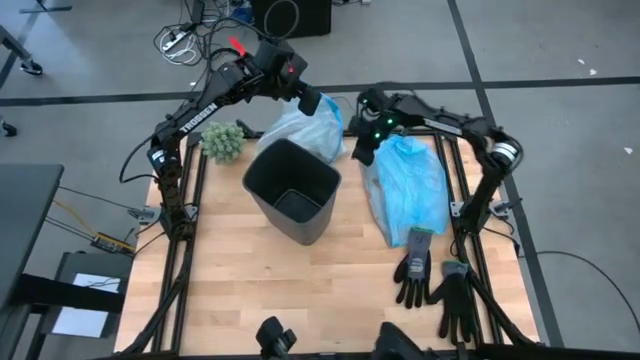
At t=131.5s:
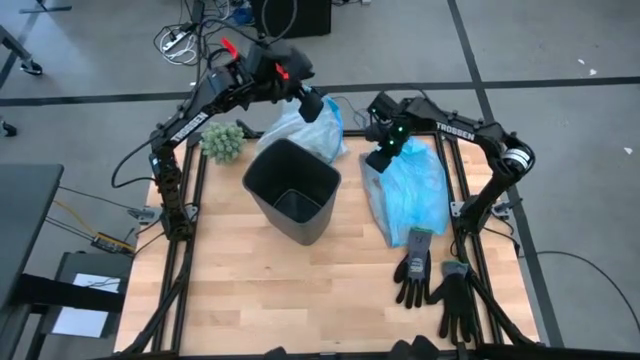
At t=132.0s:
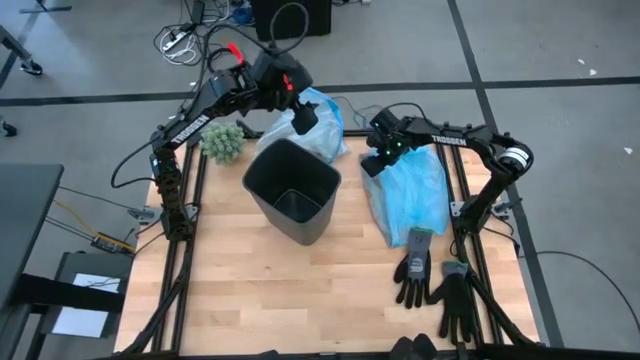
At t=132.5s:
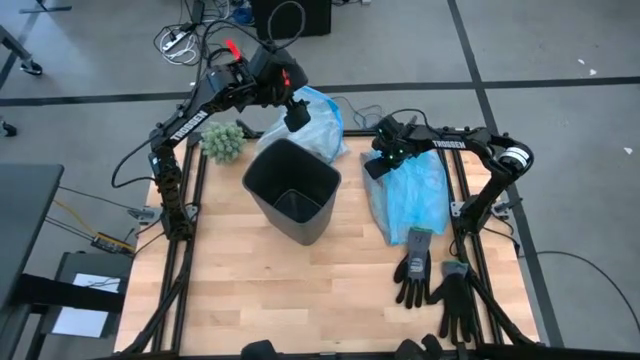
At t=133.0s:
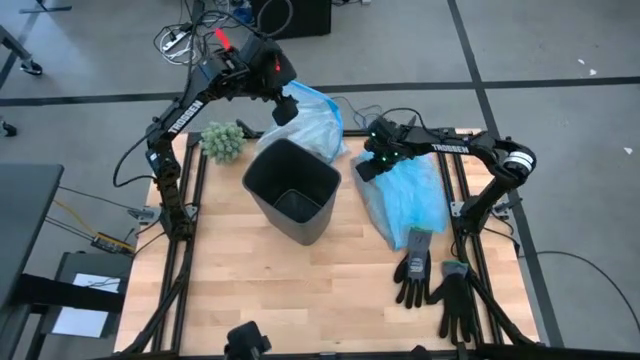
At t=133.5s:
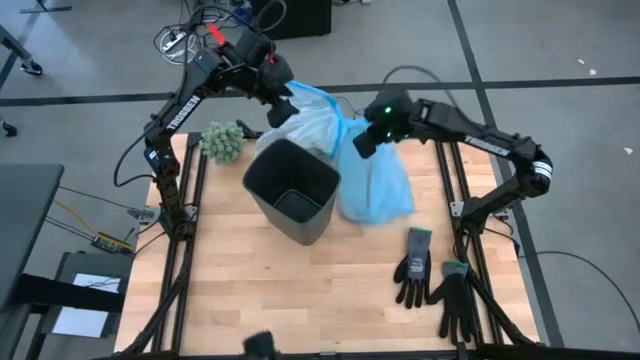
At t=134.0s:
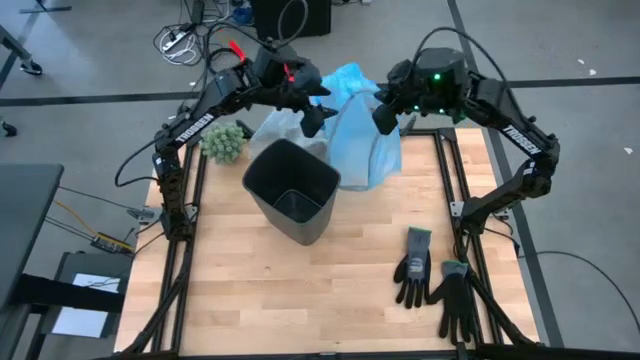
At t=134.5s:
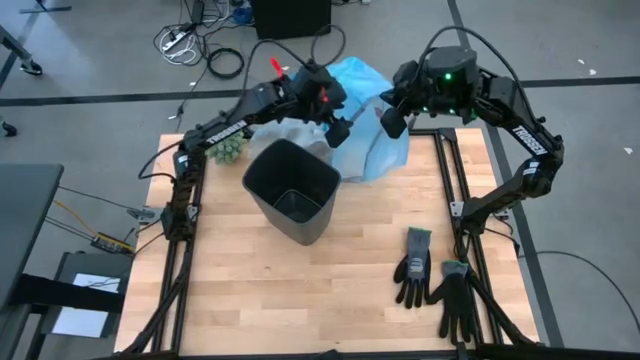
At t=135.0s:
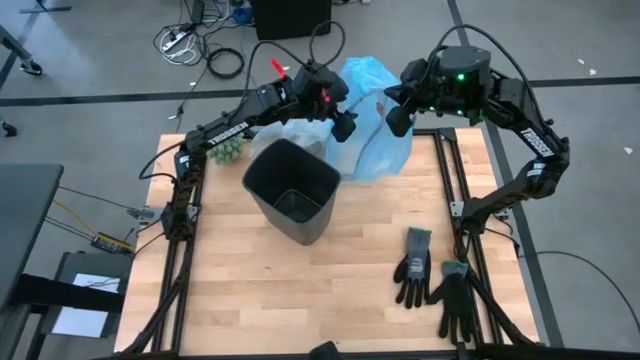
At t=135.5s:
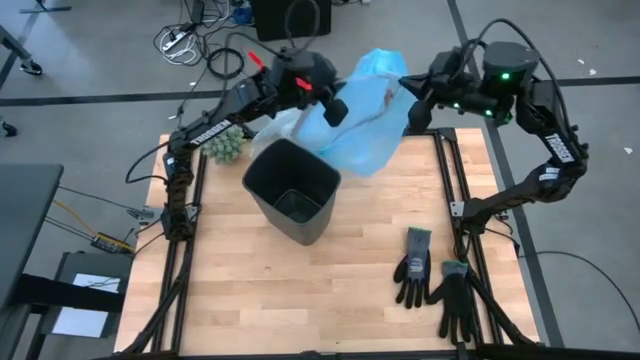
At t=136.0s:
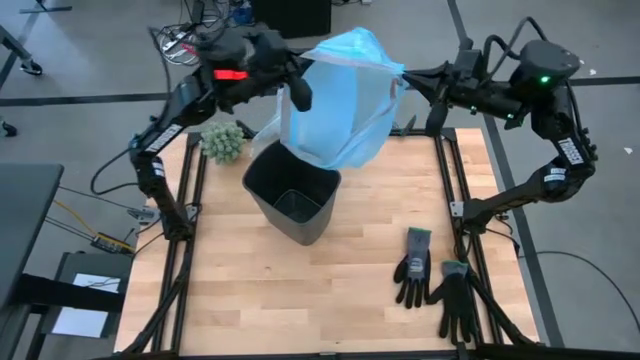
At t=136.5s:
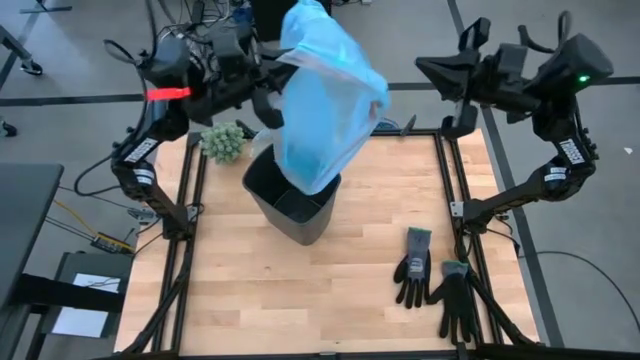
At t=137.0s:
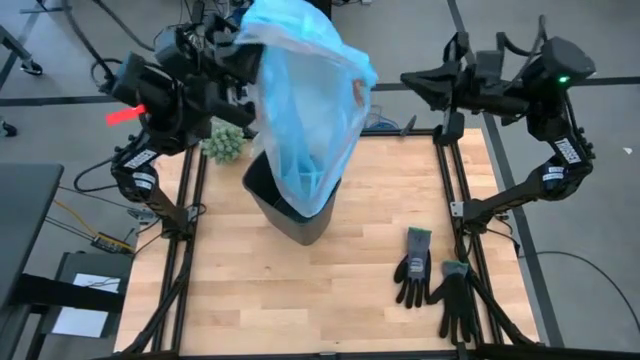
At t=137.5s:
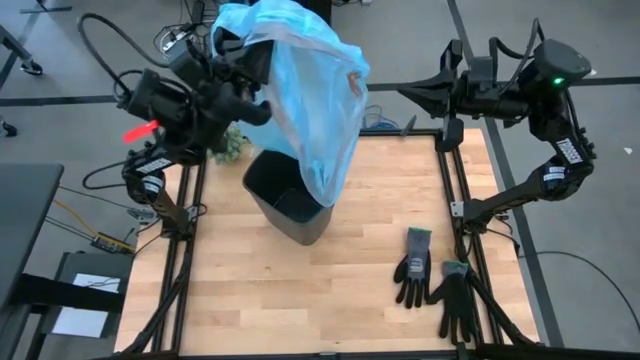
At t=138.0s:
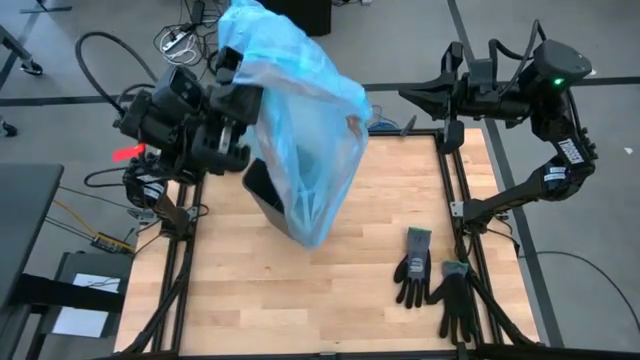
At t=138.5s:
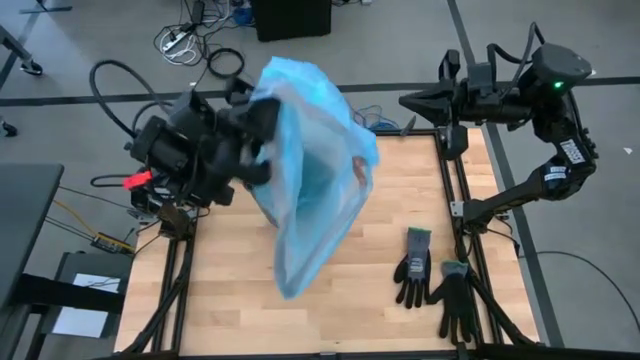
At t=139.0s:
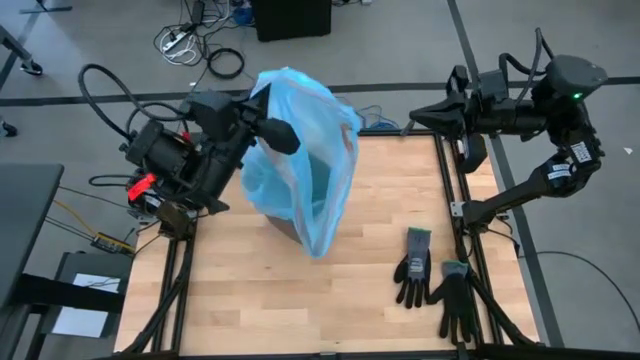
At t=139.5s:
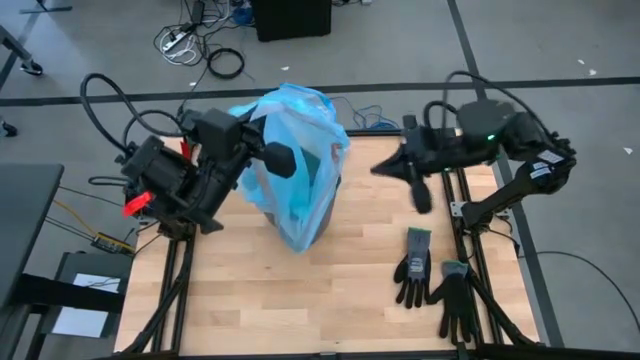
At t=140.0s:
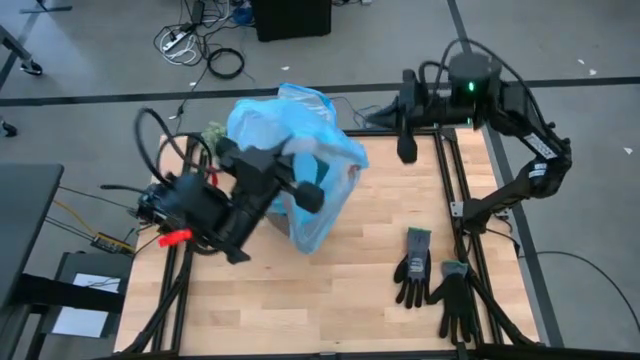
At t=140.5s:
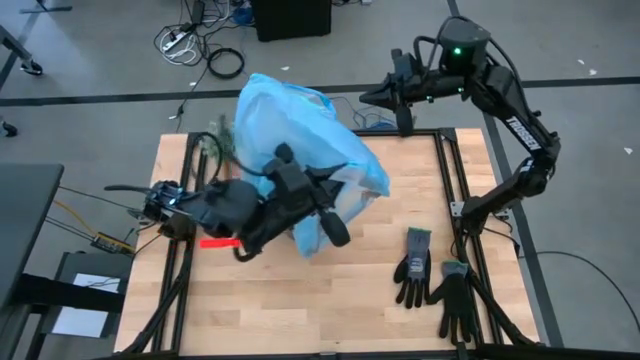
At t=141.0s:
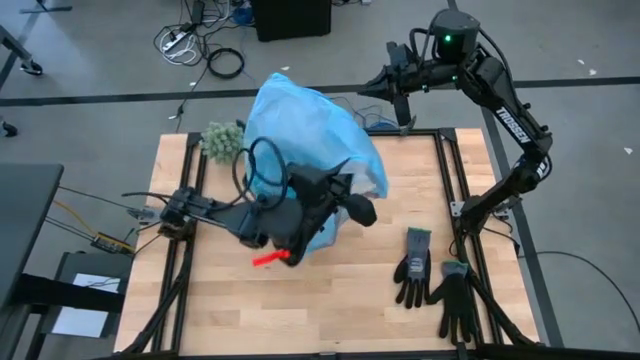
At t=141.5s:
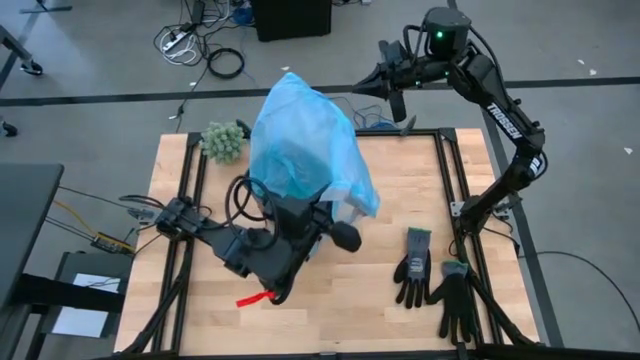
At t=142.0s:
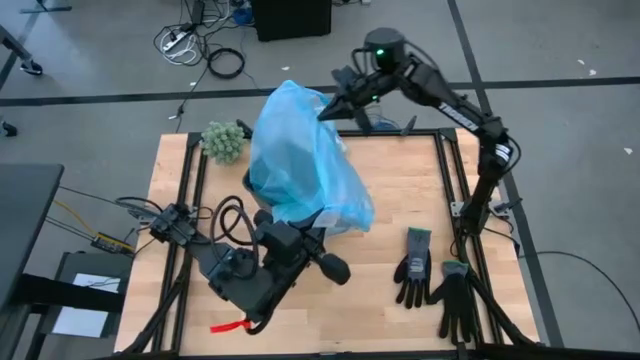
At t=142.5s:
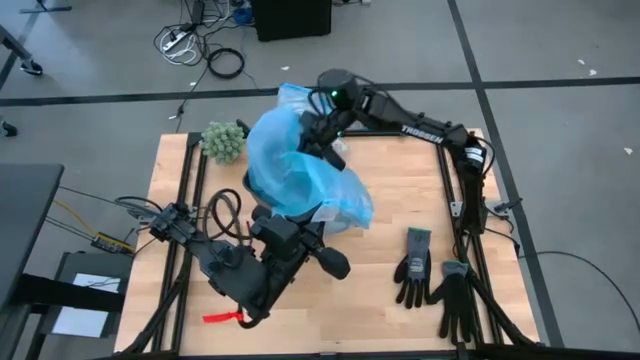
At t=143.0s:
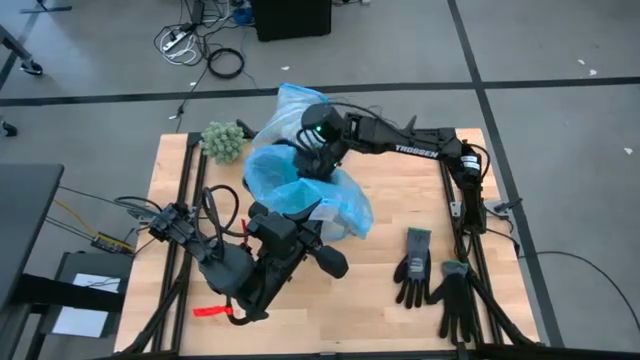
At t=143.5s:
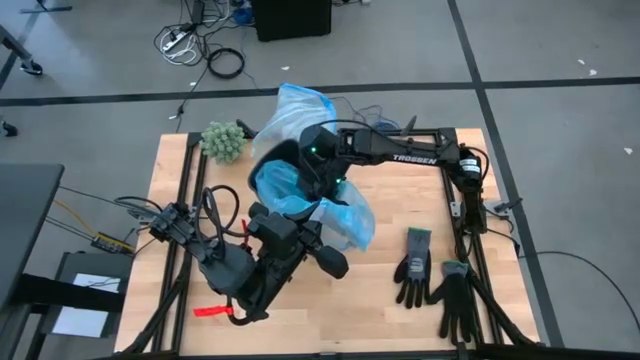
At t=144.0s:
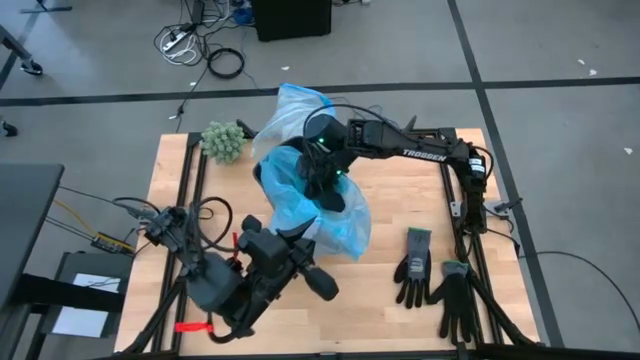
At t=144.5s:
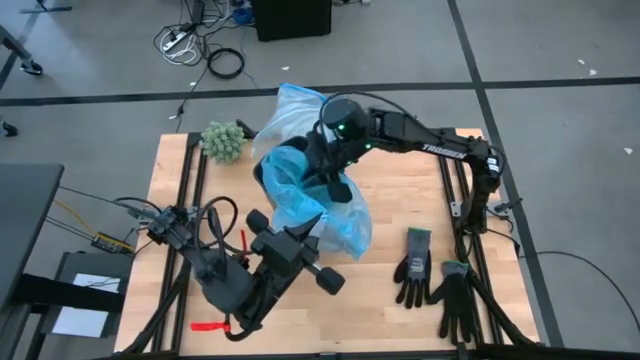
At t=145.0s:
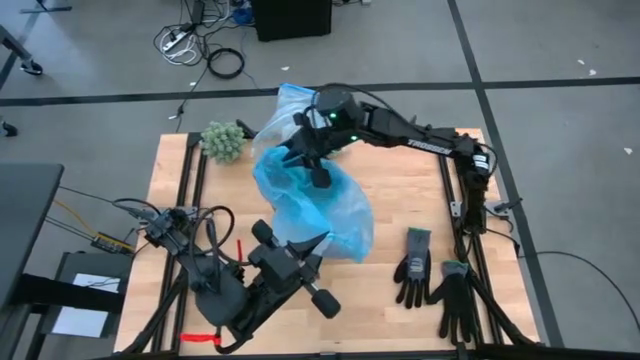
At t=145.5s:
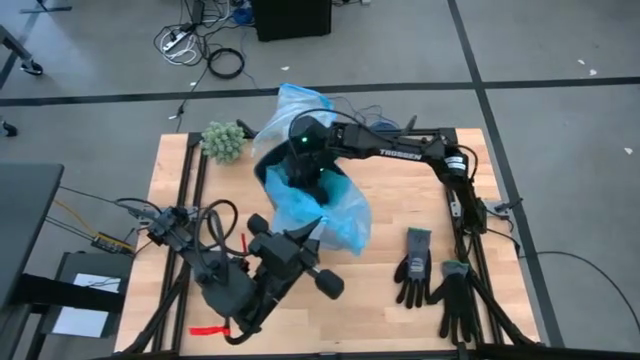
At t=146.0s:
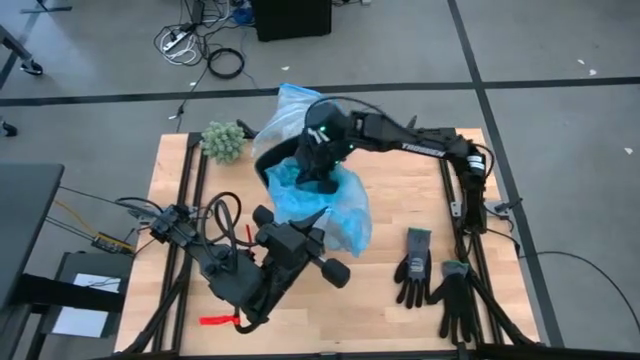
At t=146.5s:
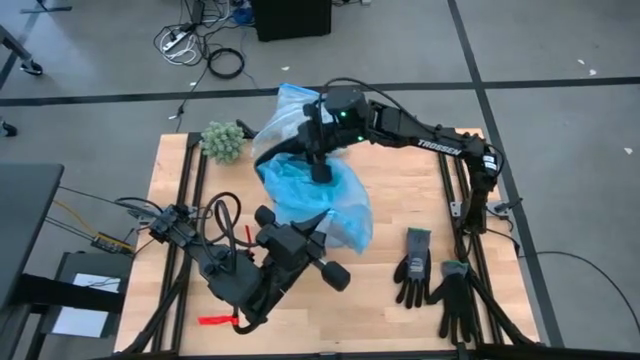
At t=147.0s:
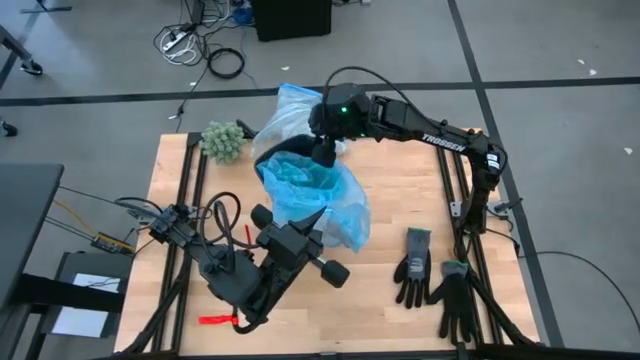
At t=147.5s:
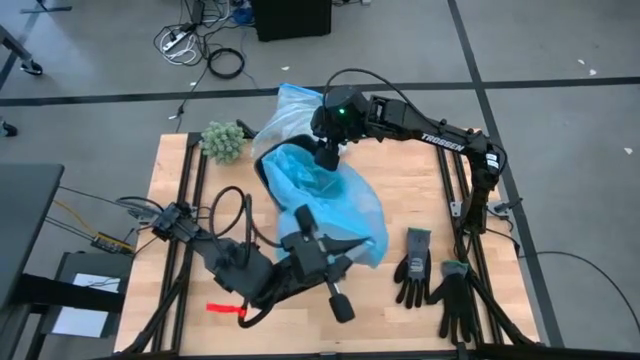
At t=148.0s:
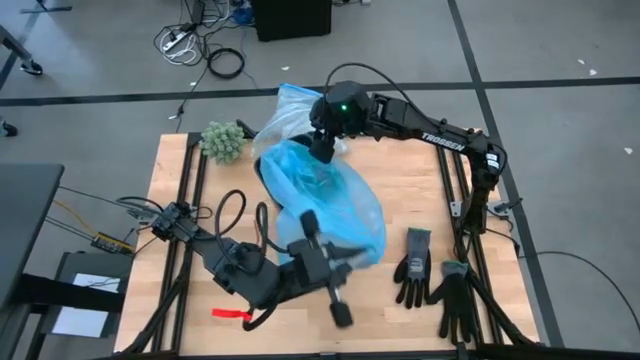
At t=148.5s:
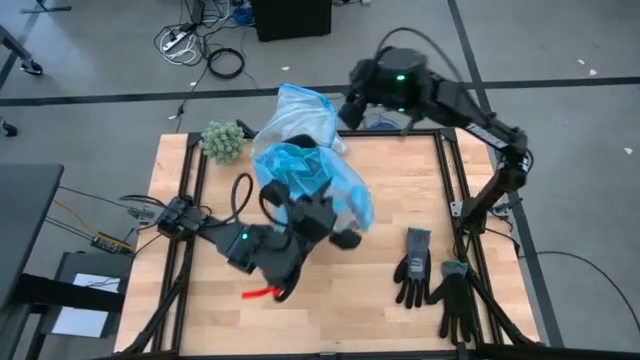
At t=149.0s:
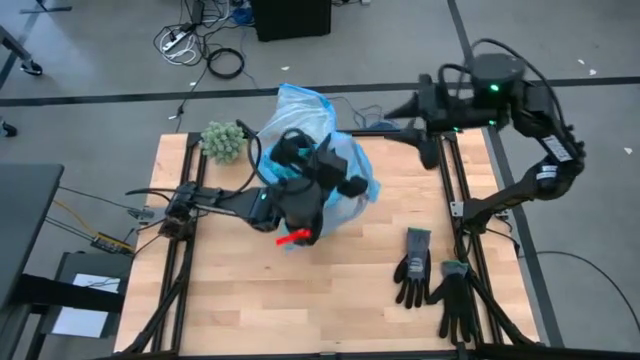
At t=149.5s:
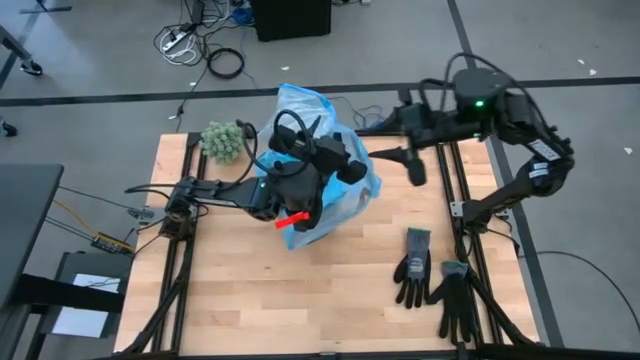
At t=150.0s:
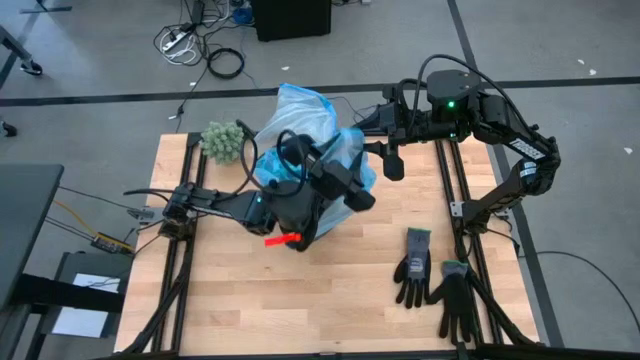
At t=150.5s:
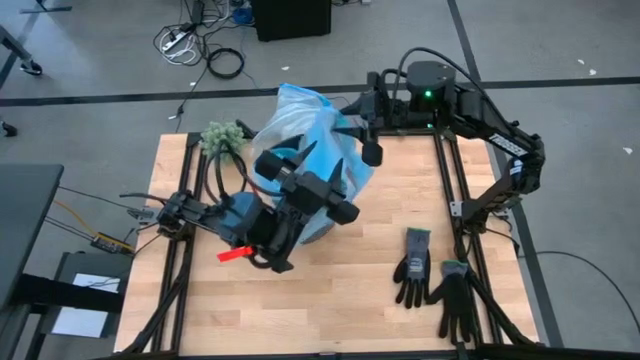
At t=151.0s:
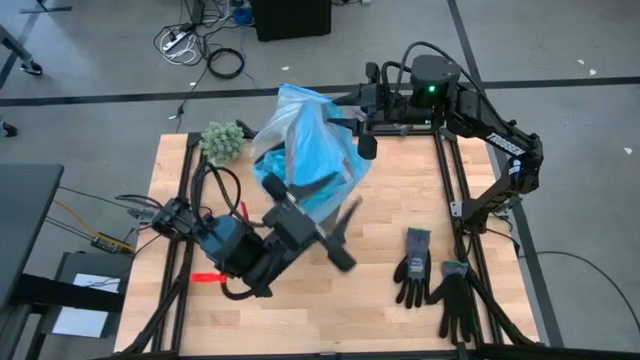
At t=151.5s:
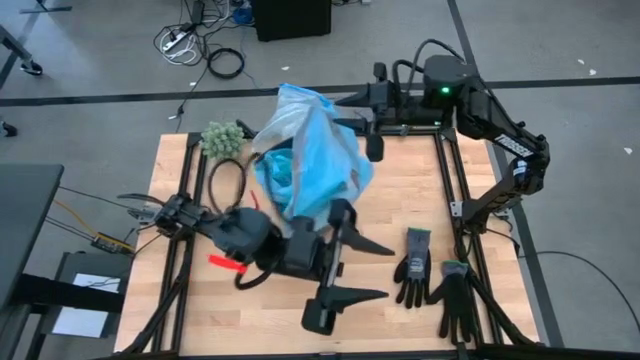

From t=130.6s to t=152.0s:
Task: place trash/remove bag and relplace
Insert the new blue trash bag into the trash bin
